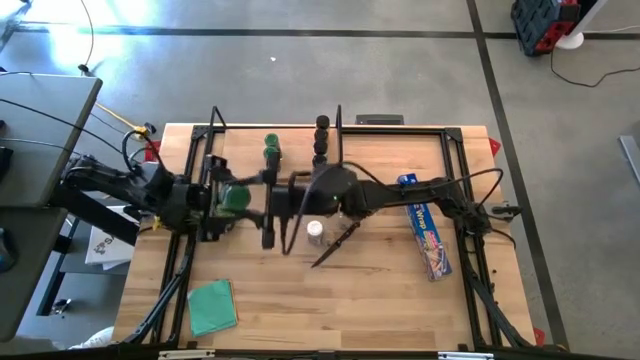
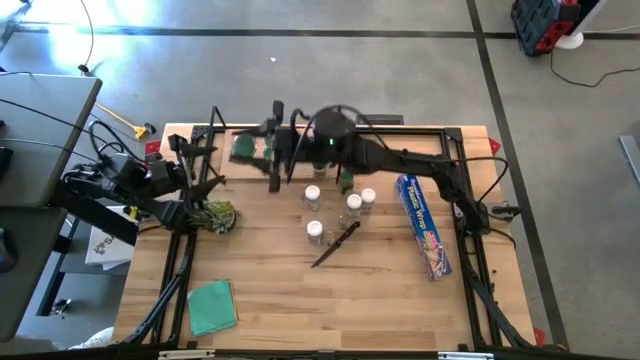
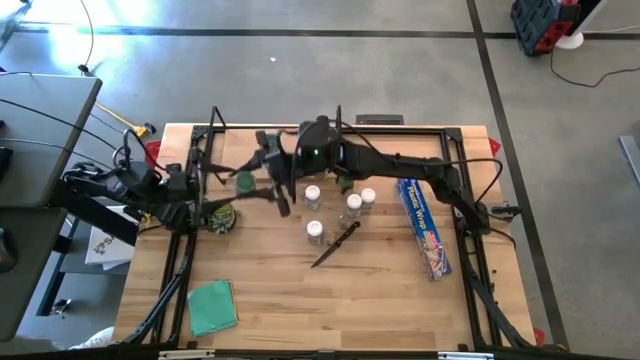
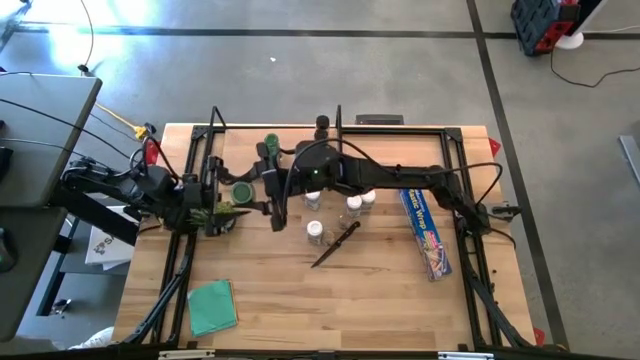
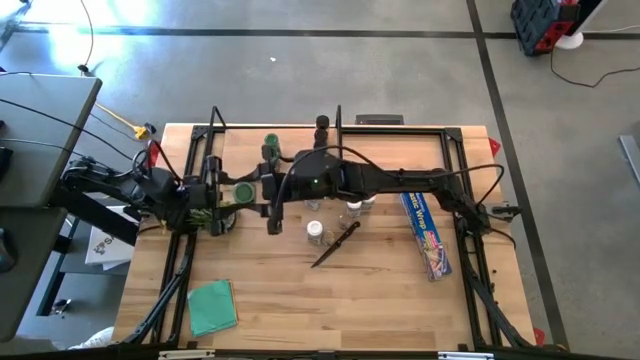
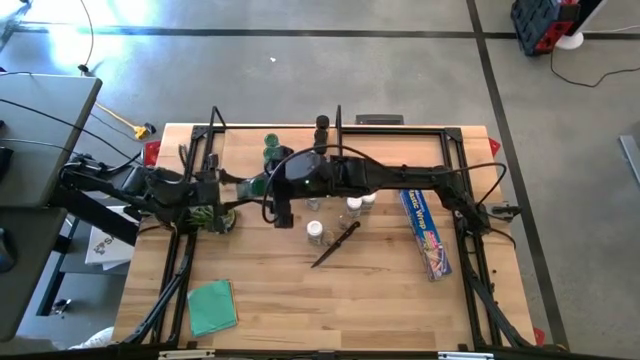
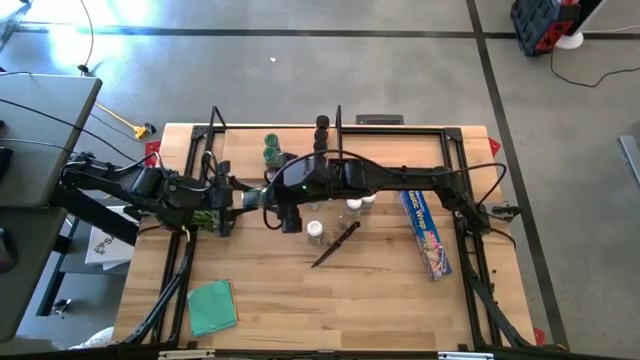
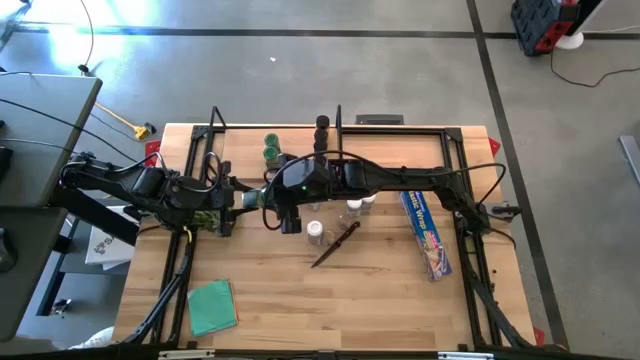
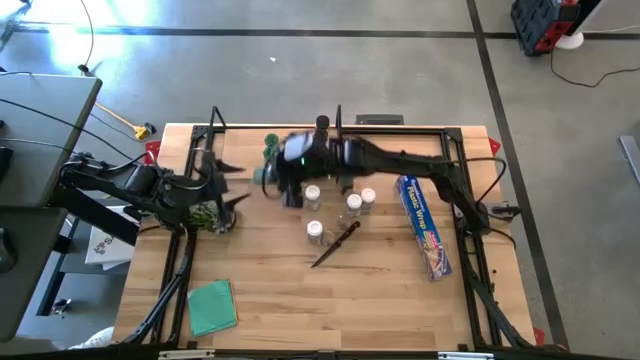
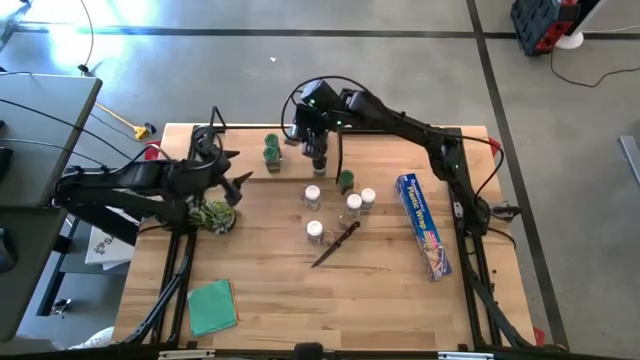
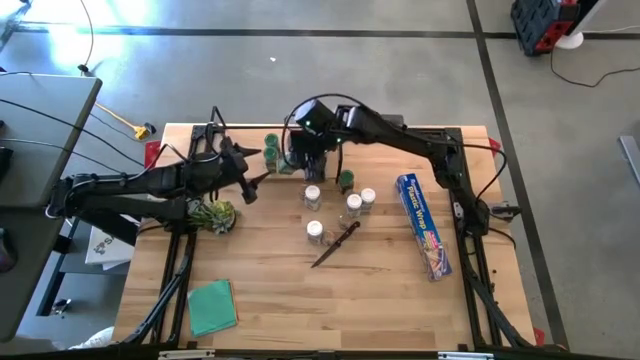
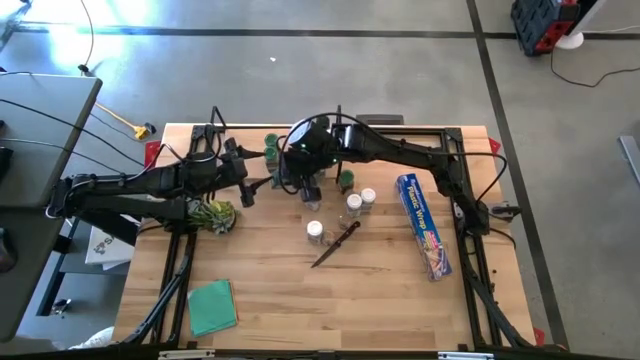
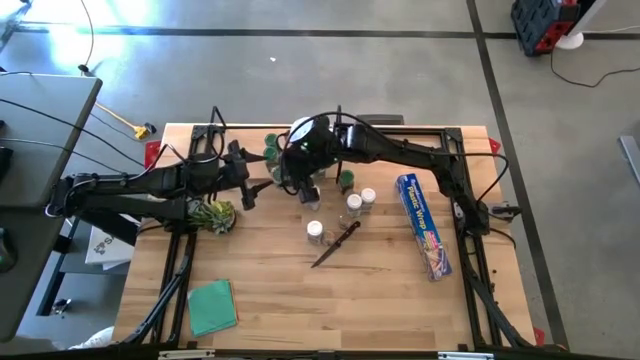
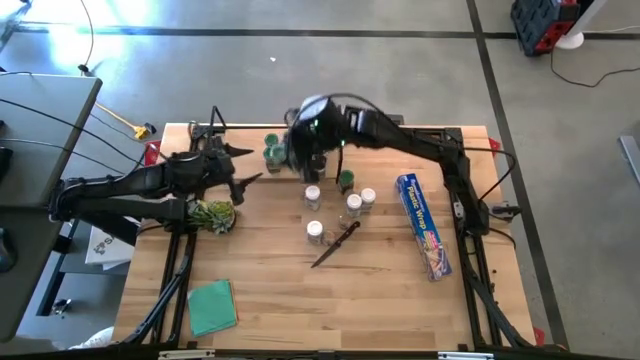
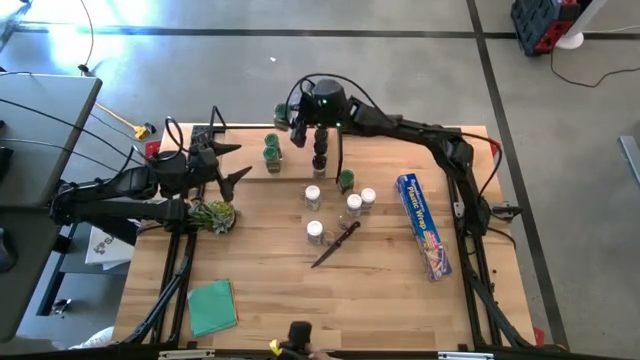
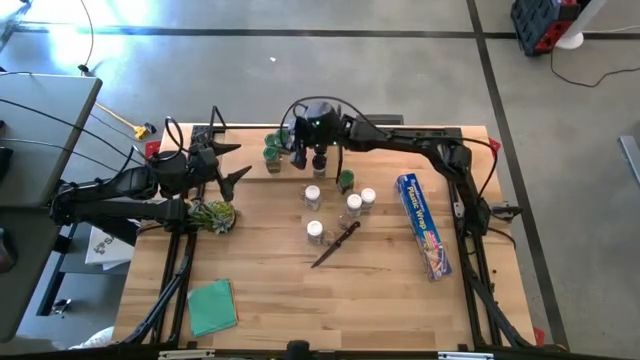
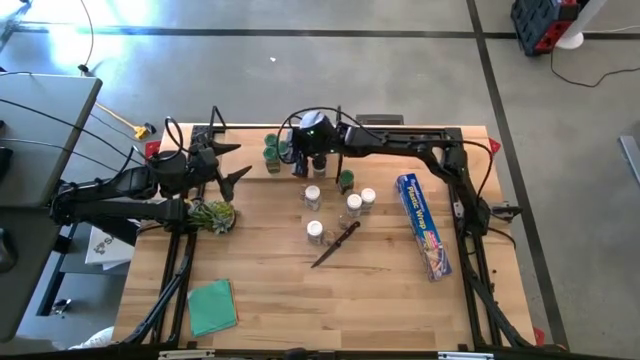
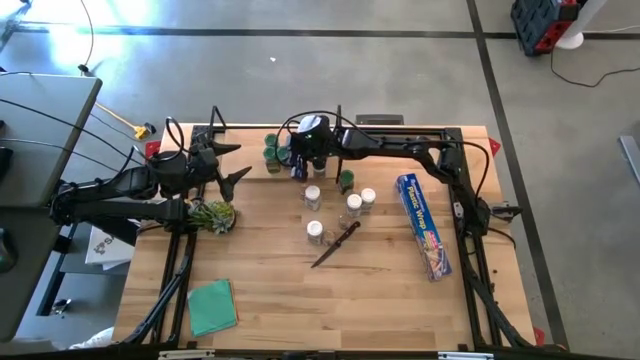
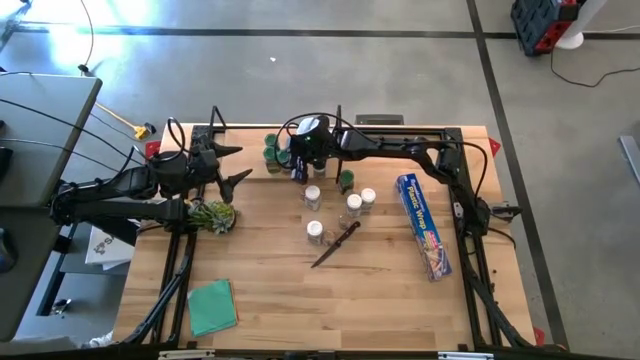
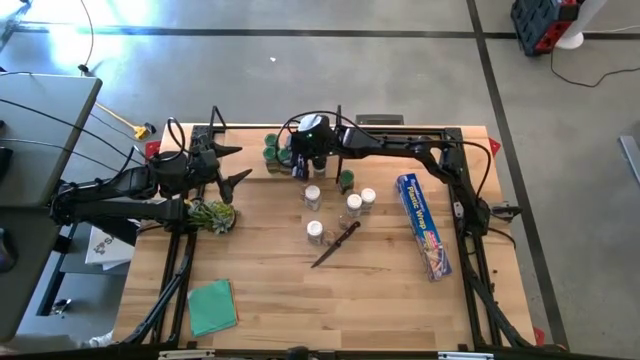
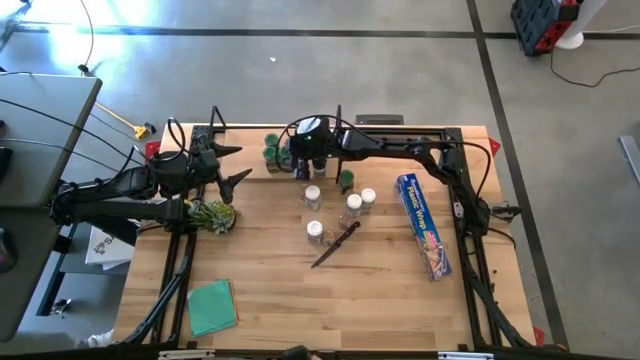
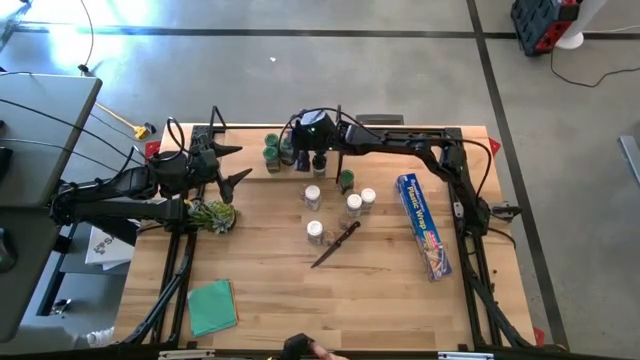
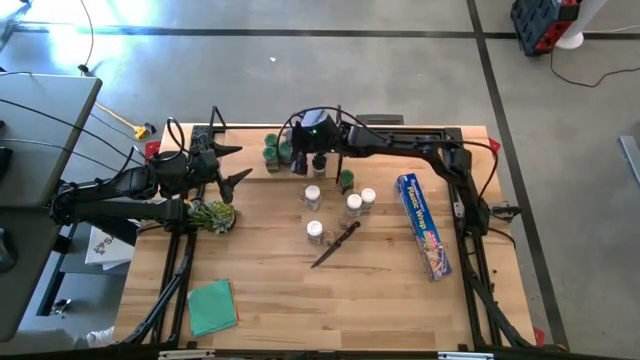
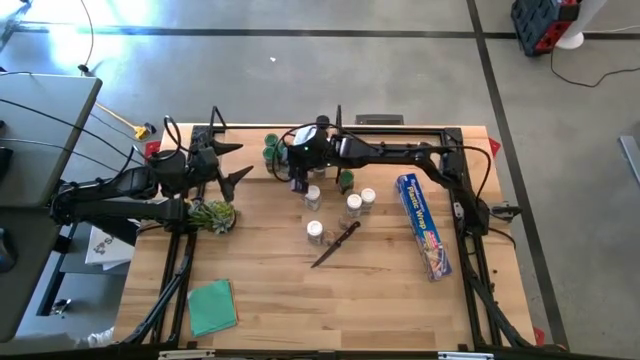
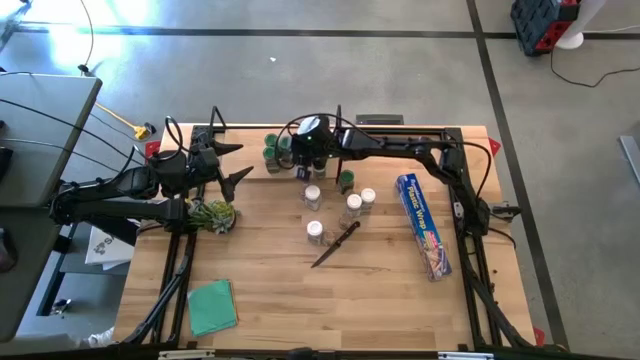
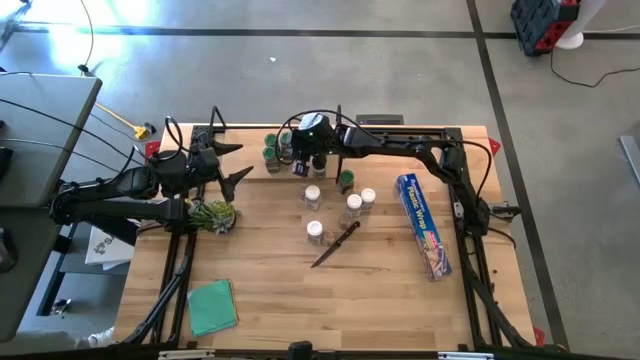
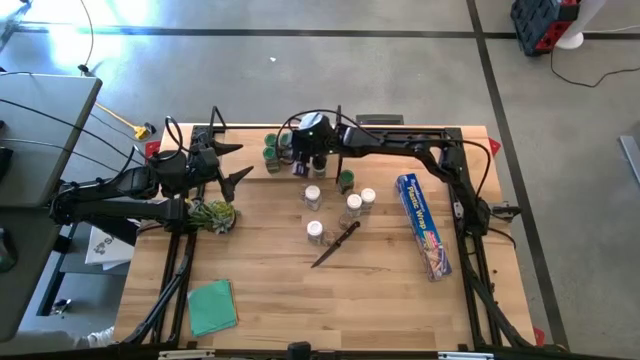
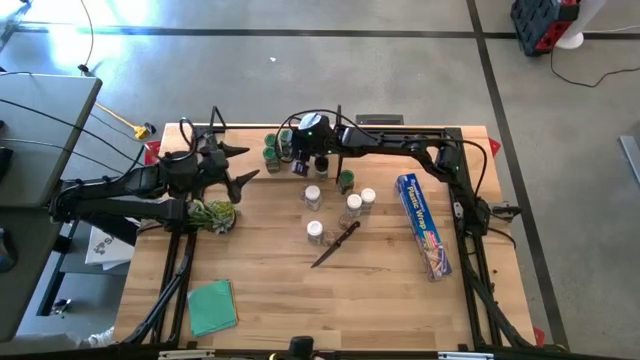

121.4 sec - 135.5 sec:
Task: Shelf spices
Put the green lid seasoning bottle on the shelf
